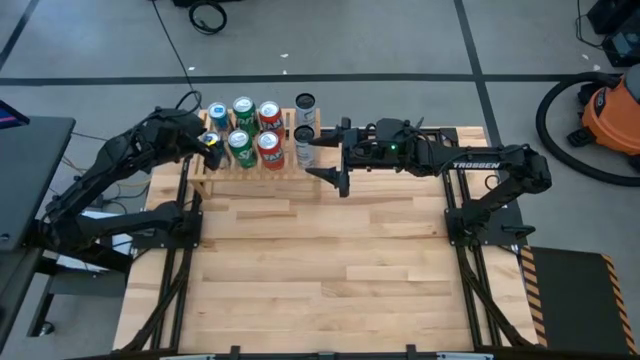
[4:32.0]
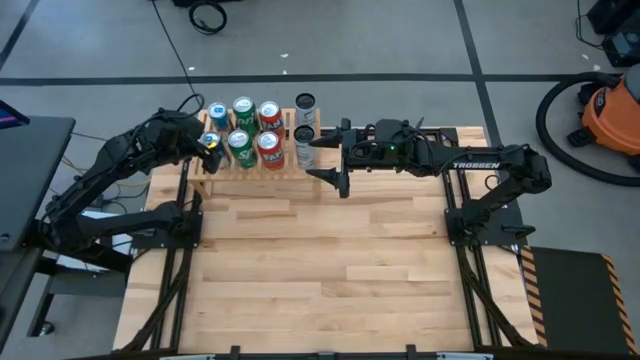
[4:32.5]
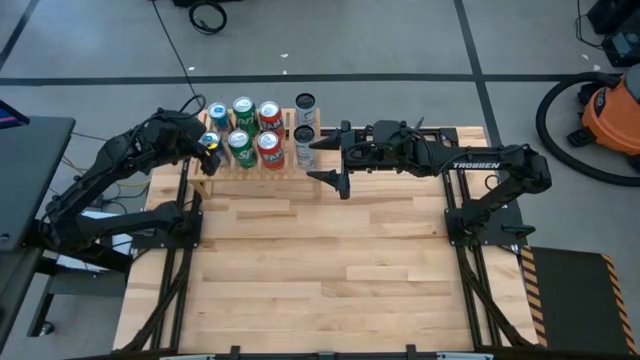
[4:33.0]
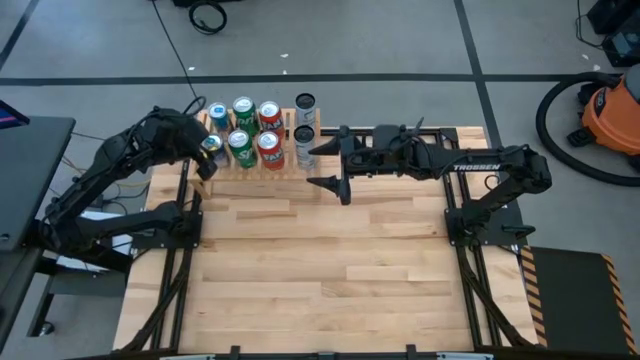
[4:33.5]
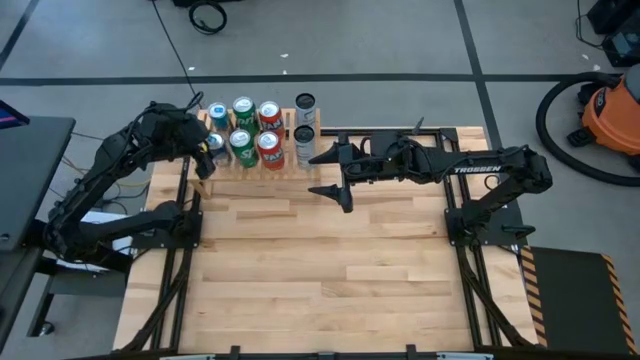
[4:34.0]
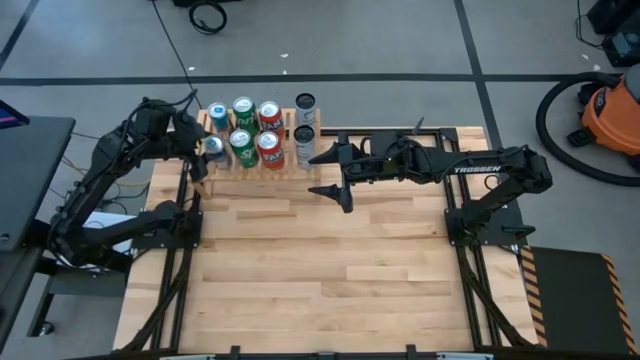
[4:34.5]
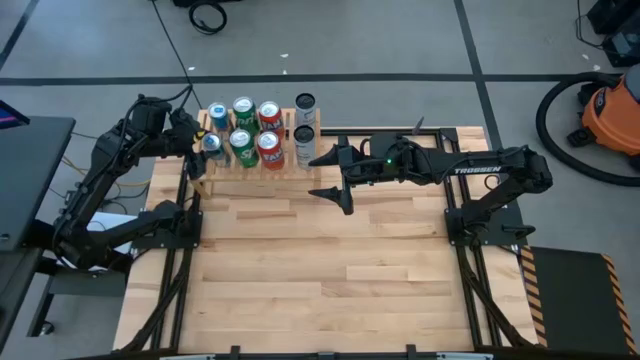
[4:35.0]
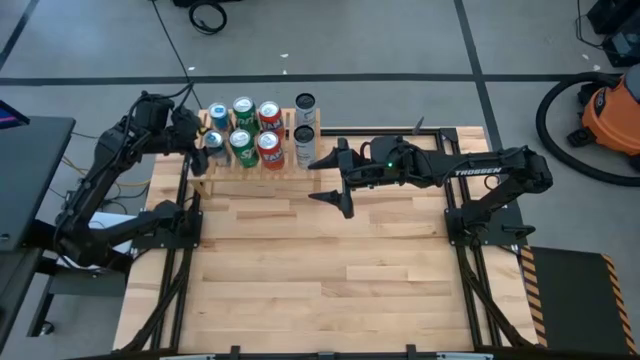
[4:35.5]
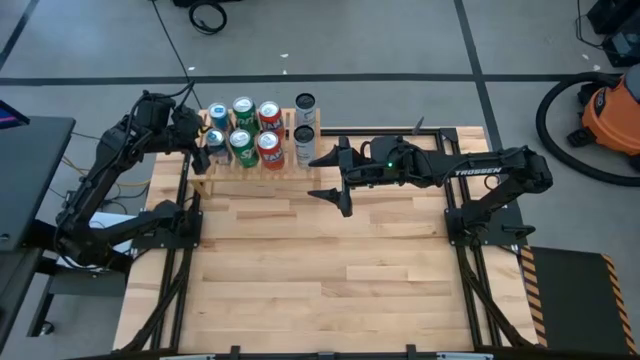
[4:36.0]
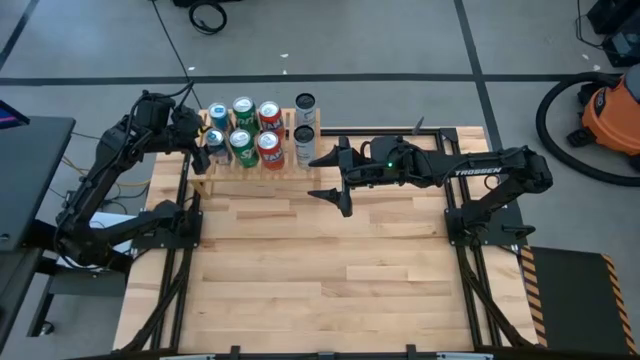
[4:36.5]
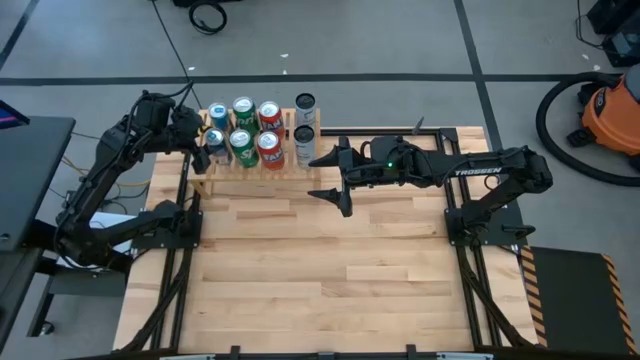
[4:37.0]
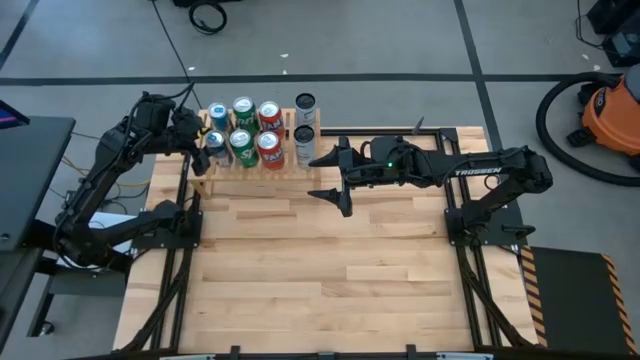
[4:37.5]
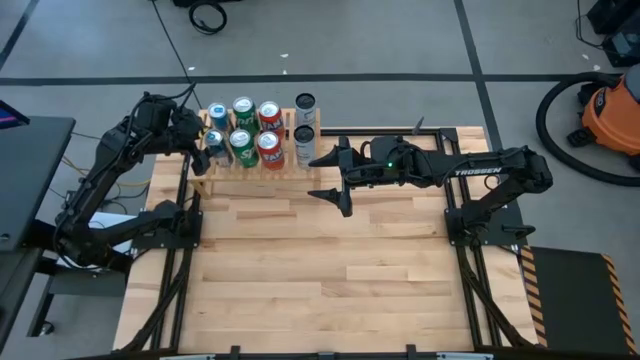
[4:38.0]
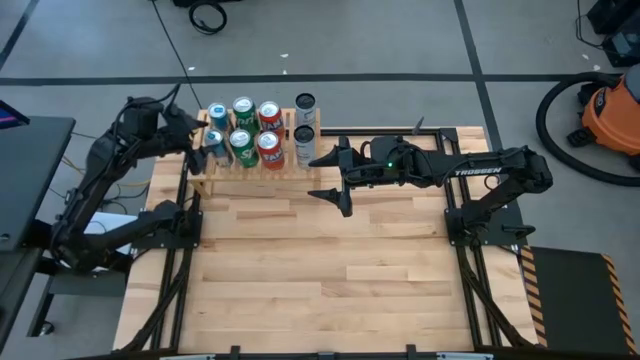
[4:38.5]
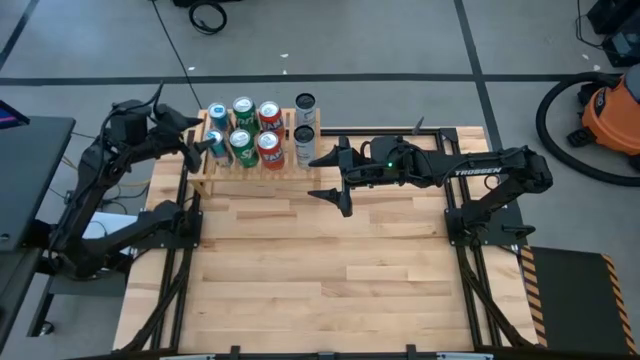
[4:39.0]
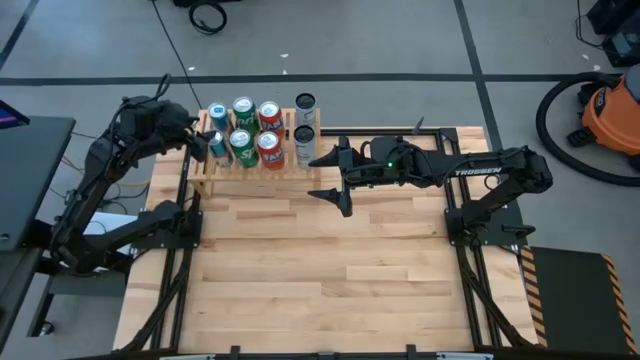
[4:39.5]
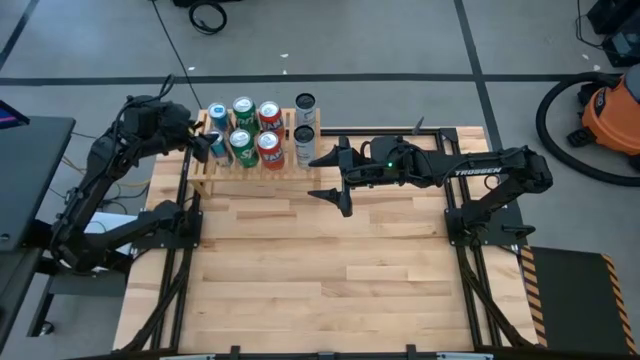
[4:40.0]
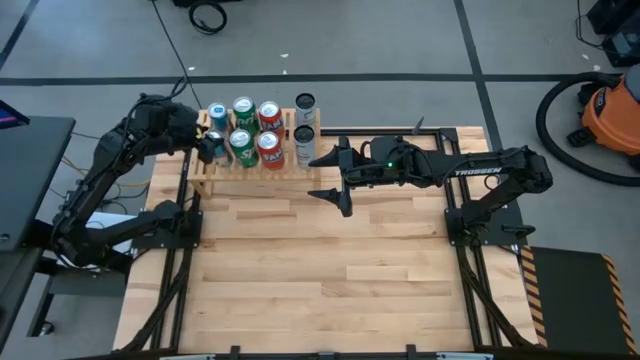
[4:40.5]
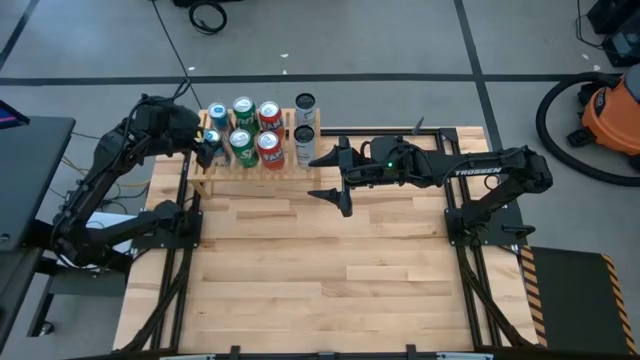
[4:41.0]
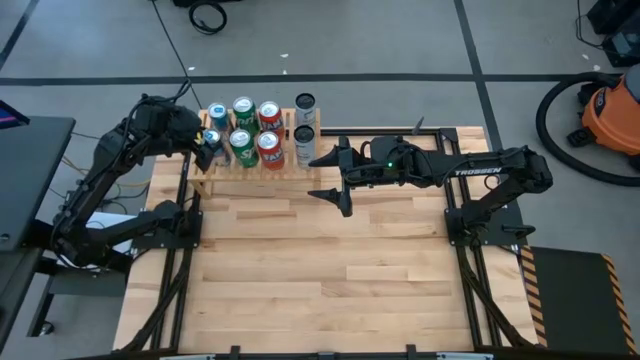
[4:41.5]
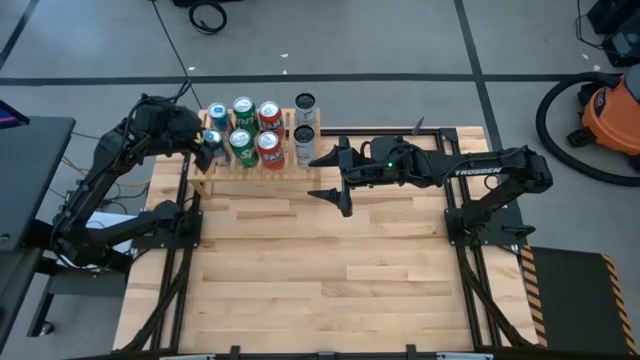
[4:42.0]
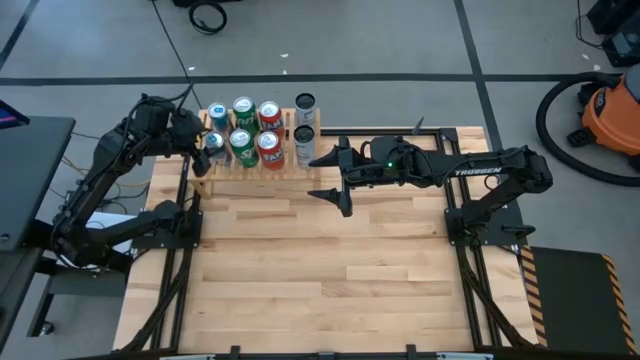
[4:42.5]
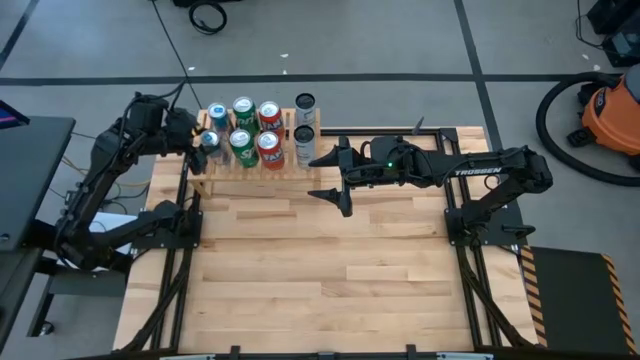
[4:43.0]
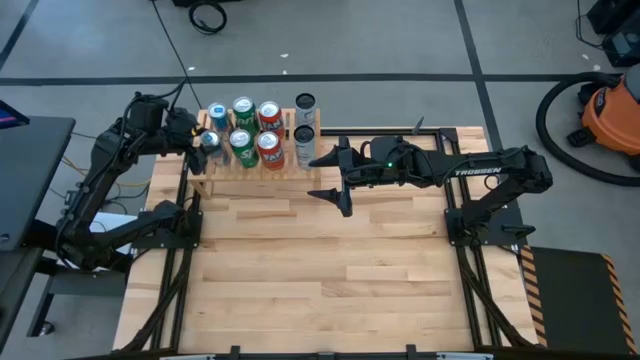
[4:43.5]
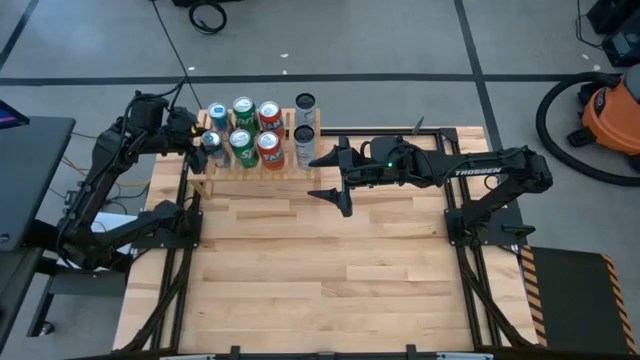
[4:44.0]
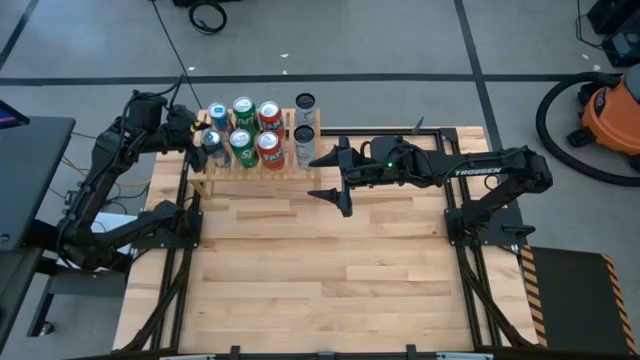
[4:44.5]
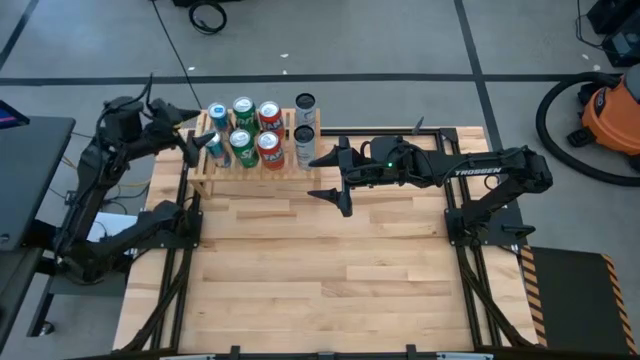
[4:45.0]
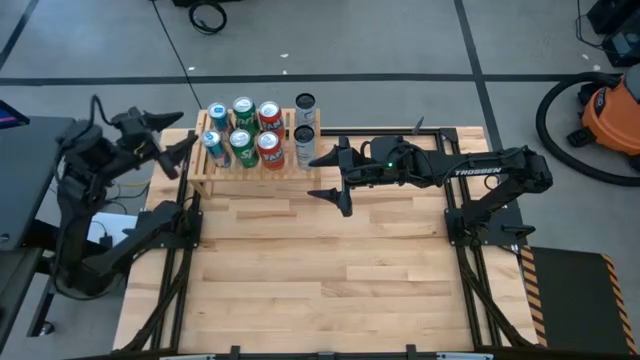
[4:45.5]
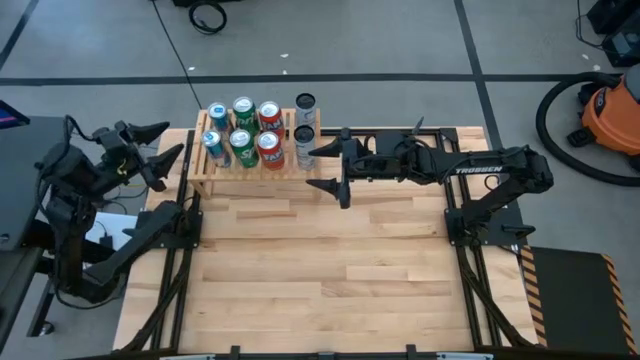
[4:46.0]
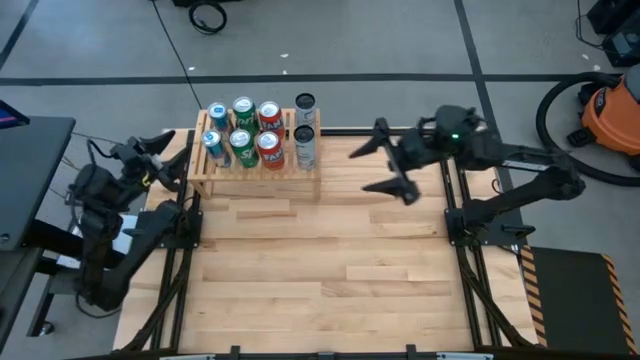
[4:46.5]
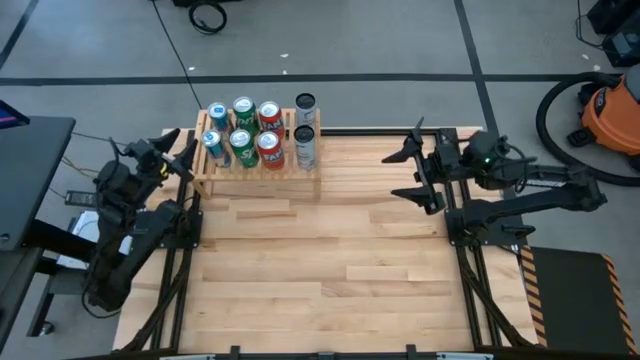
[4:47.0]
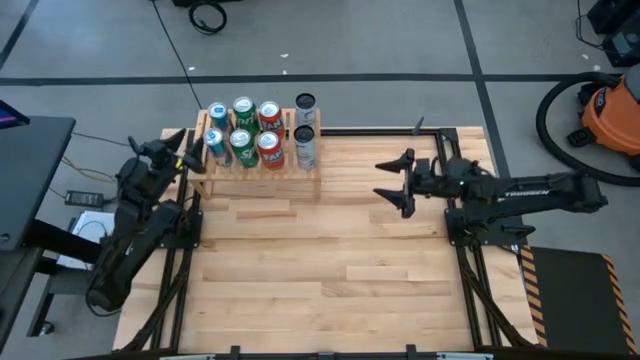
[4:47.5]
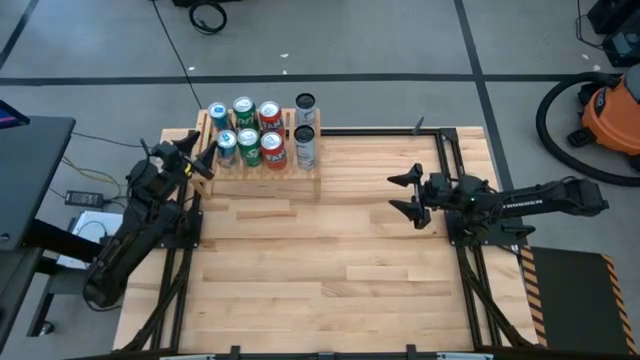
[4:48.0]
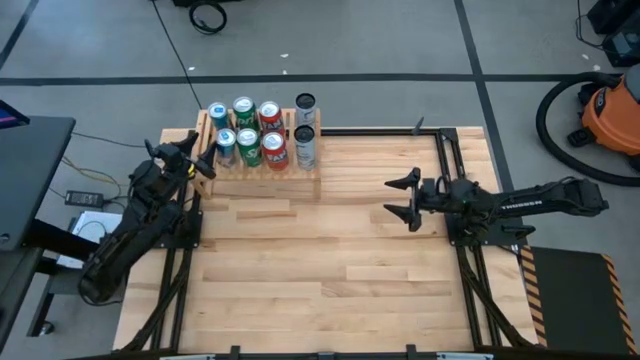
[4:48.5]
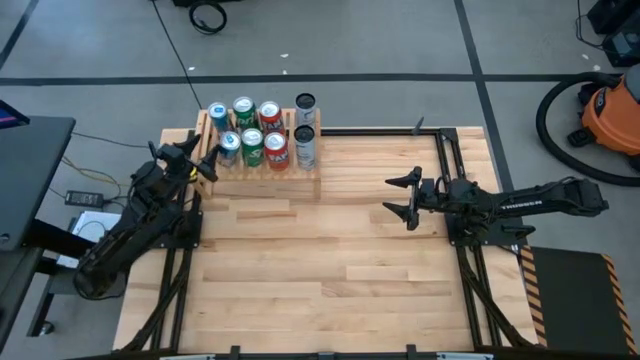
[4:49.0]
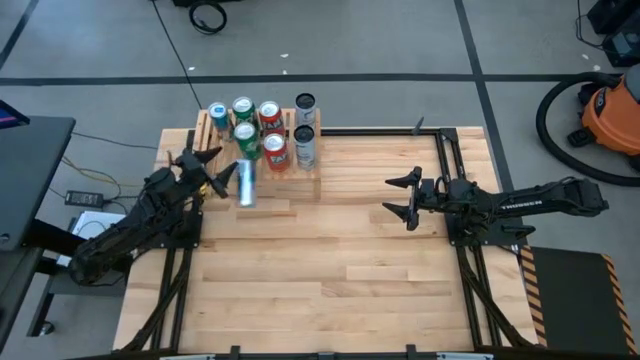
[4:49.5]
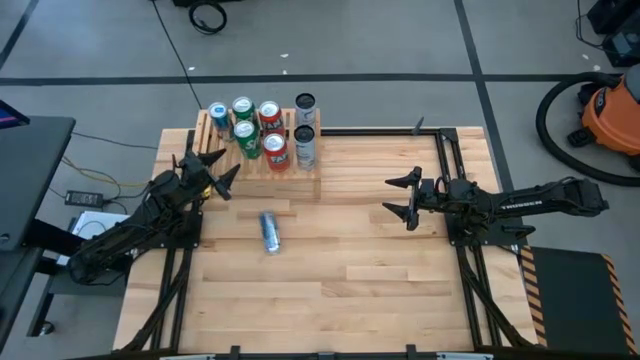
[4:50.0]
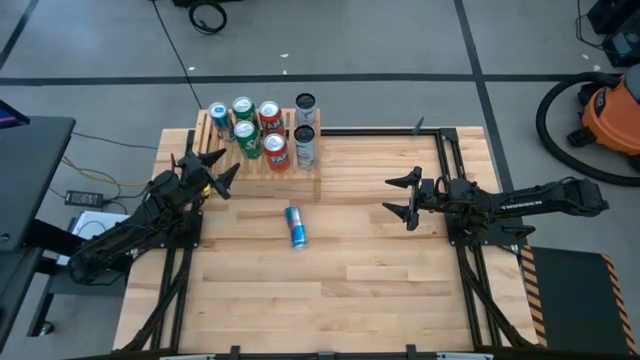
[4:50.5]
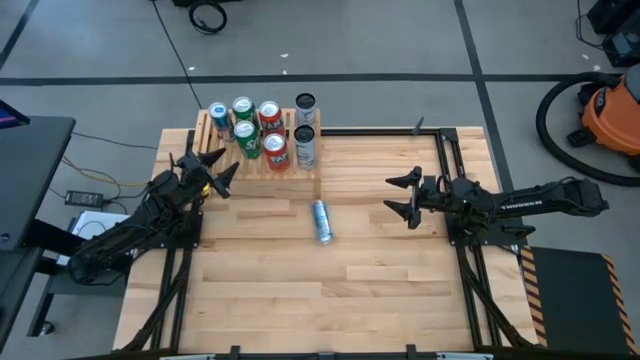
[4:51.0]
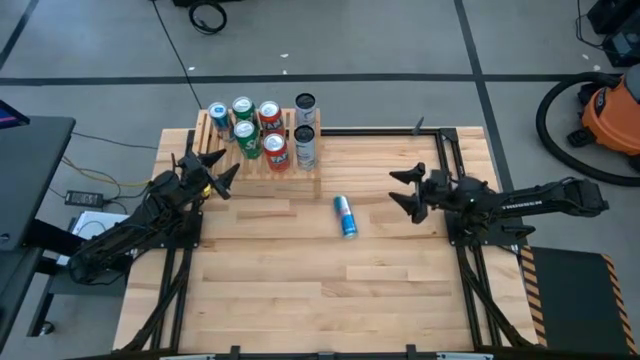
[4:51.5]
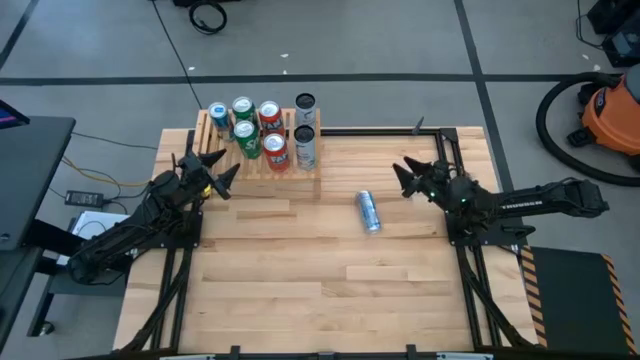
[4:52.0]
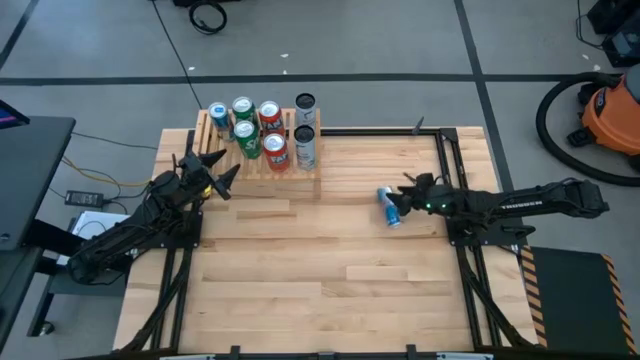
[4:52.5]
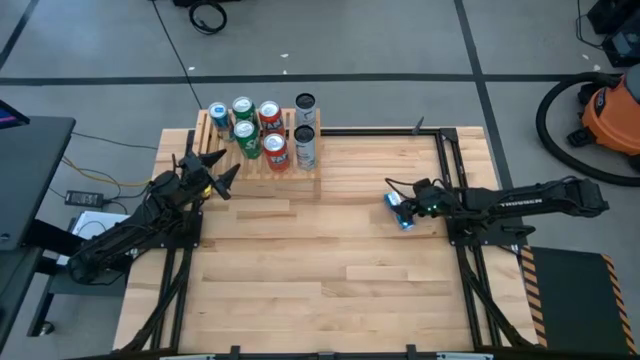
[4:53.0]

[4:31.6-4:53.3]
Task: Place canned beverage on shelf
Put the blue soda can on the shelf
